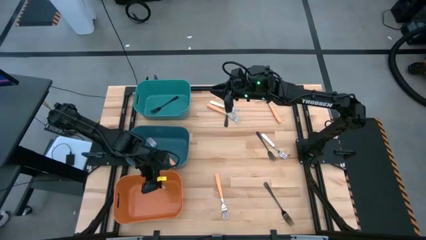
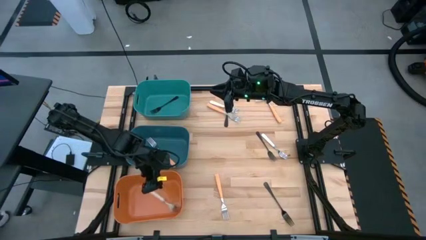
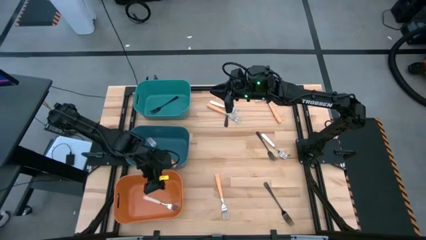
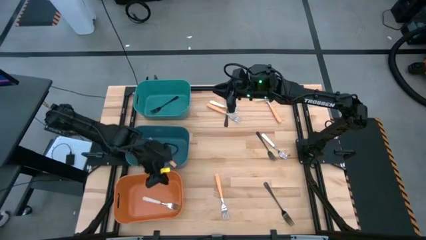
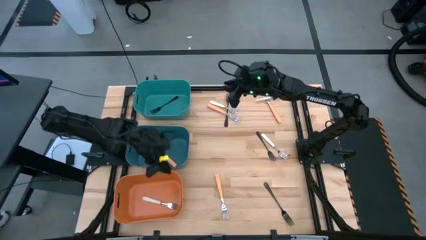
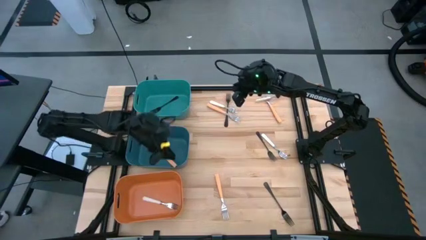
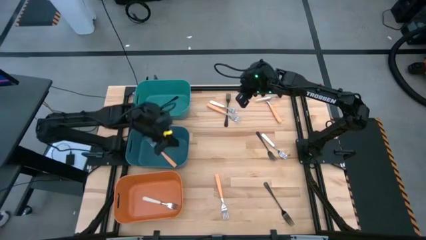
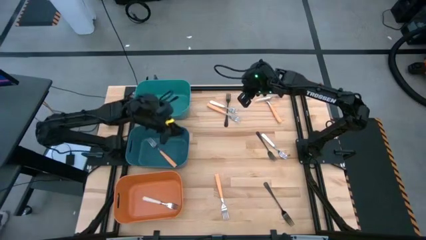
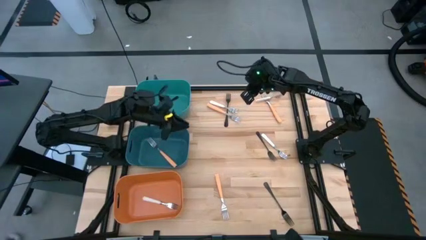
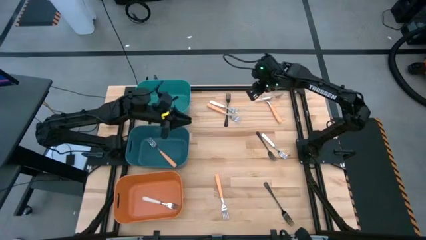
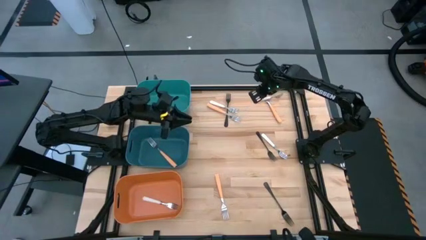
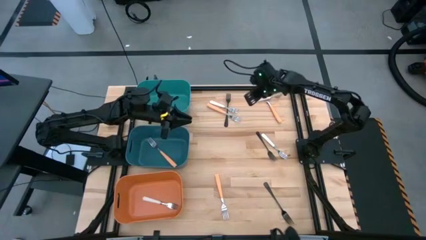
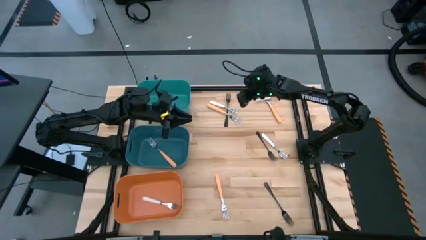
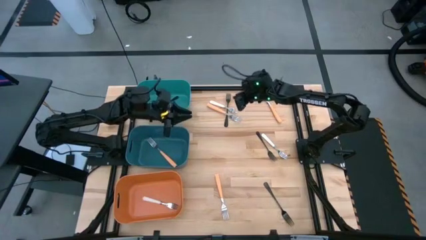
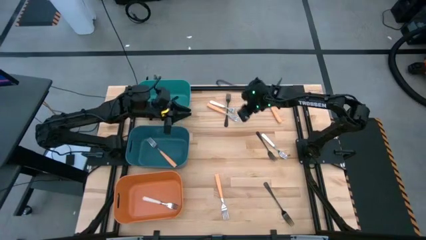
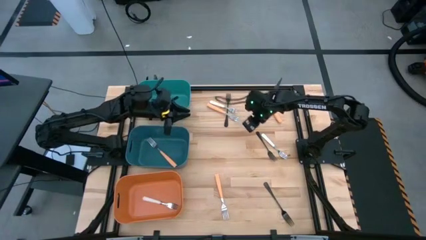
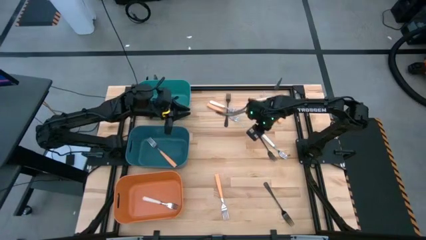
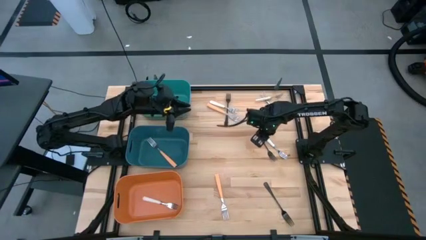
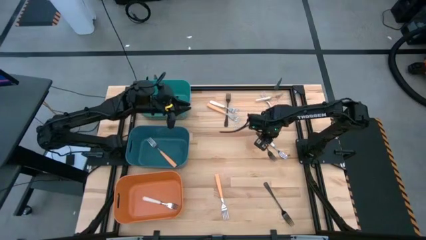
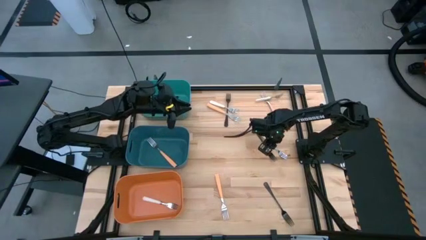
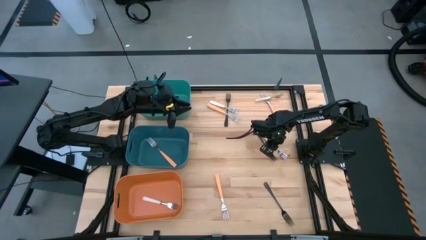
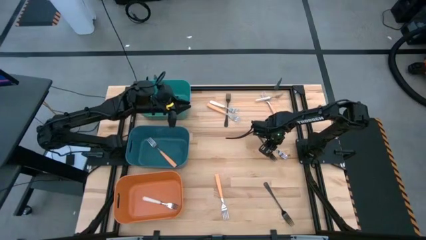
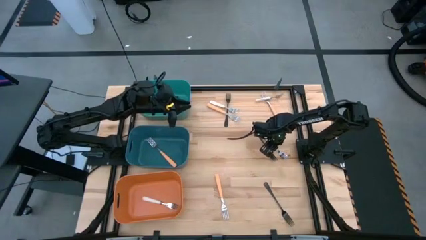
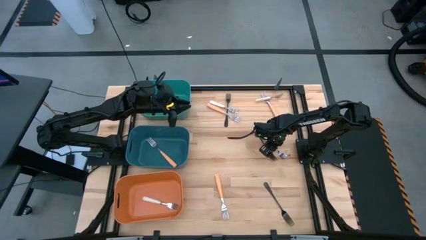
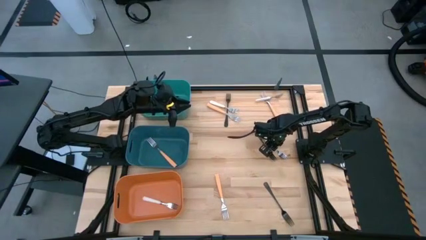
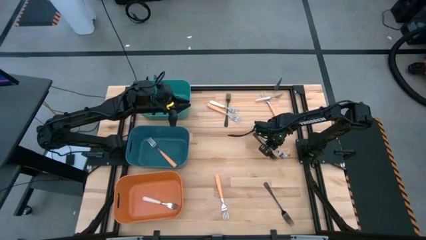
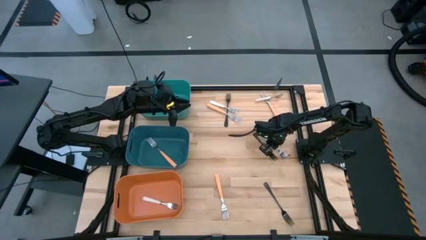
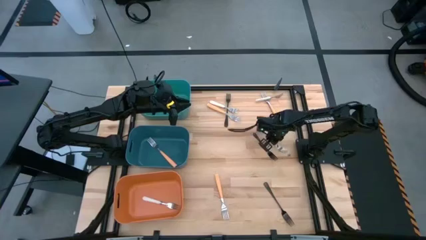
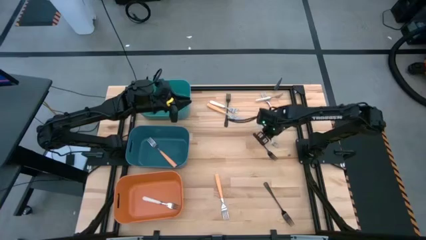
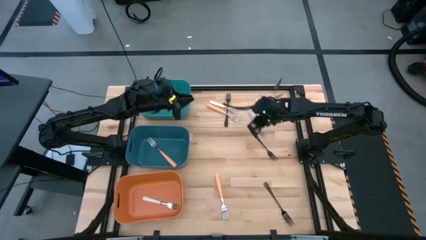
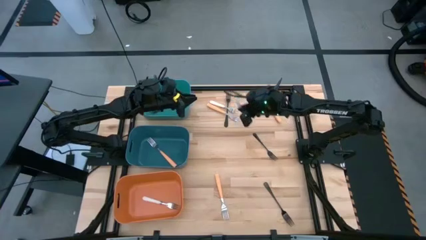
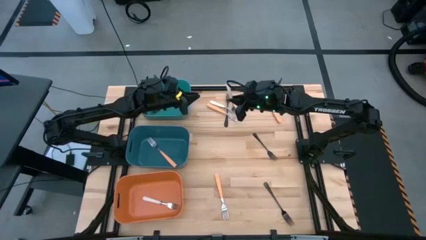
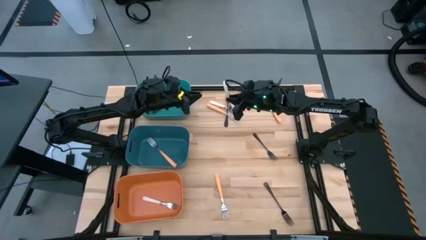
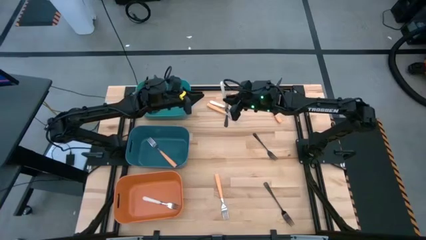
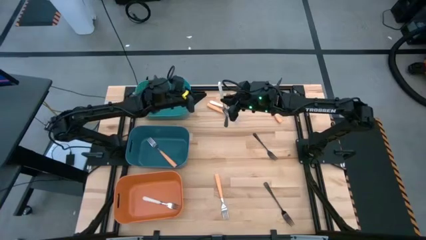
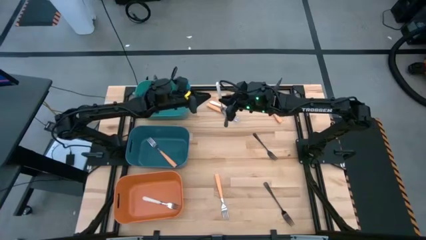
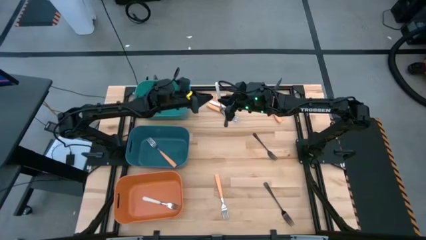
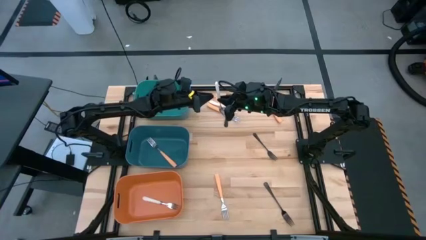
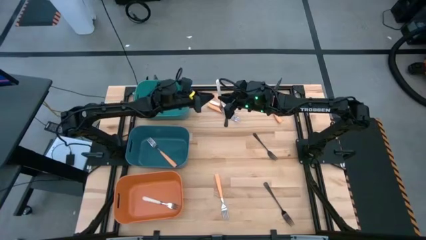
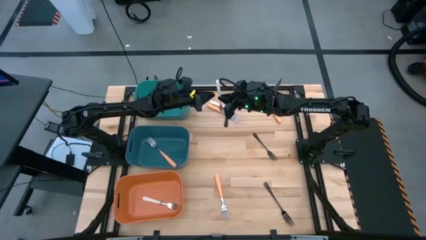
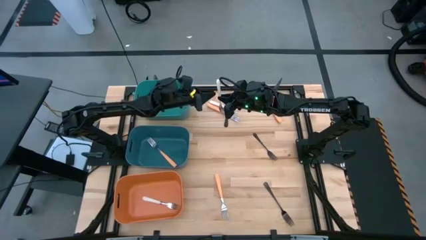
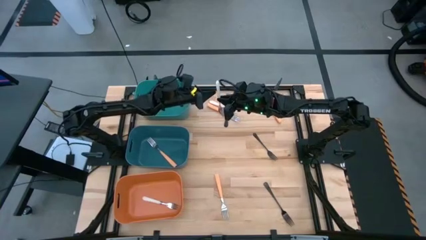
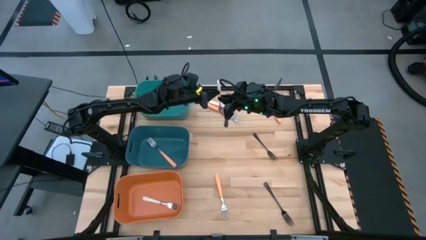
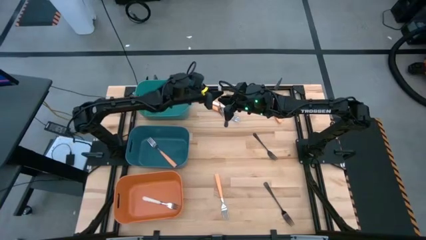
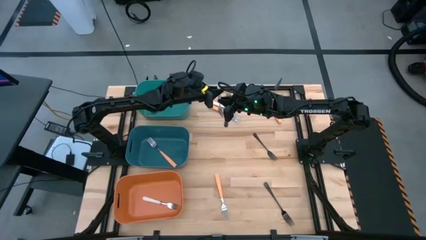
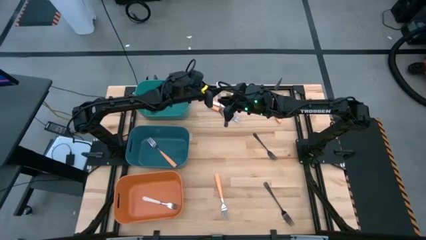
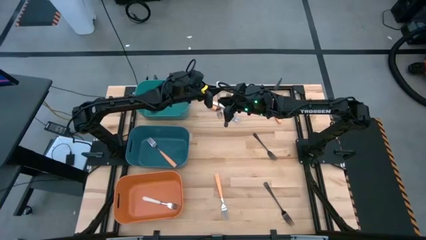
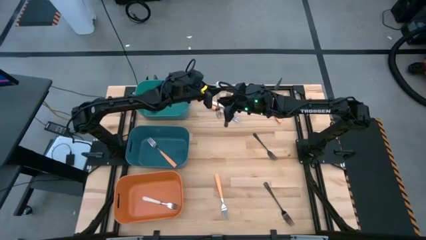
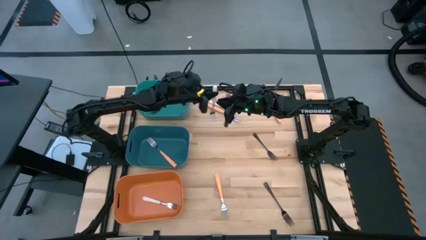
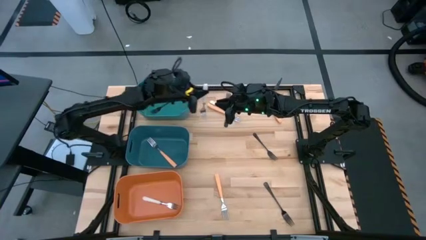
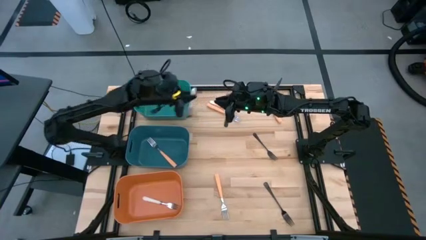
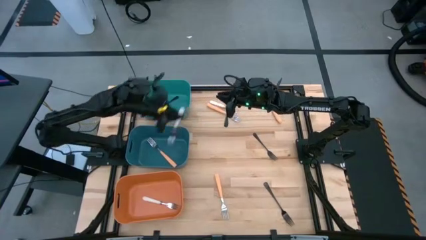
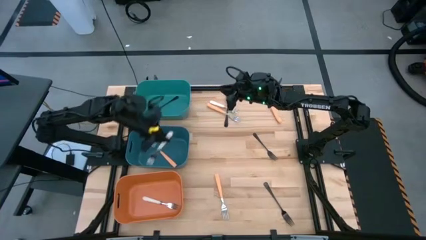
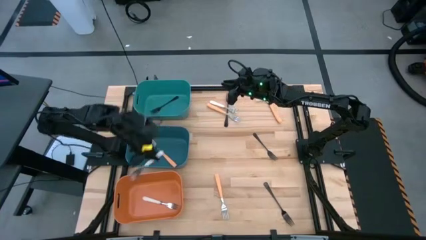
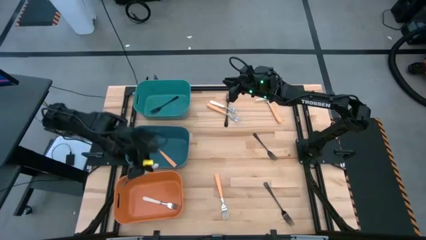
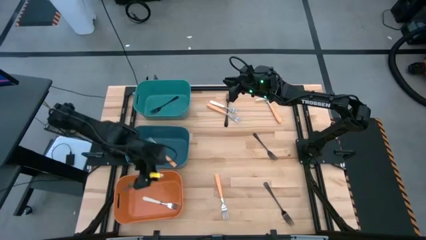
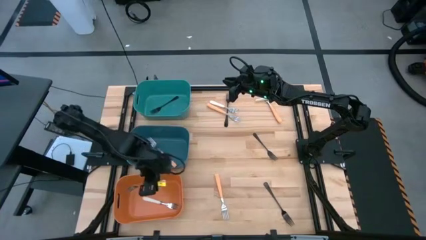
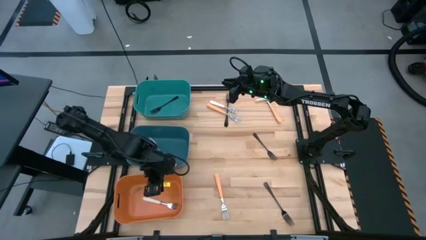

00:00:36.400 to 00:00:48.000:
Task: Sort silverware by color (type)
Put the white fork into the orange bin

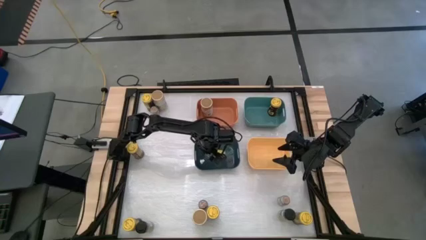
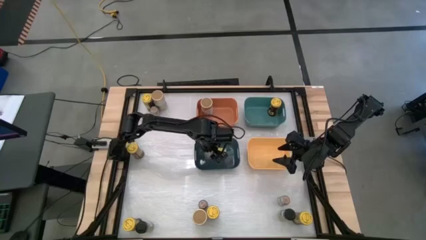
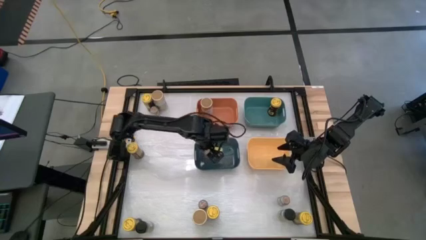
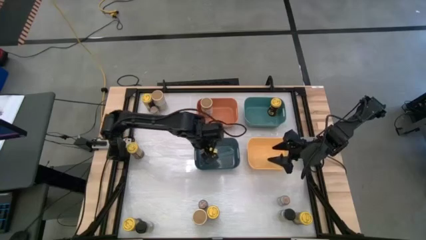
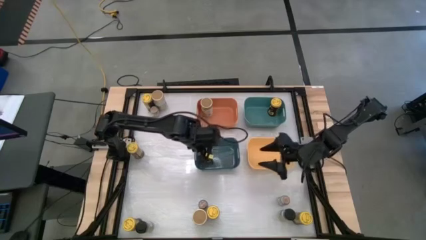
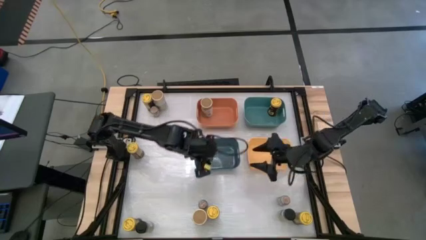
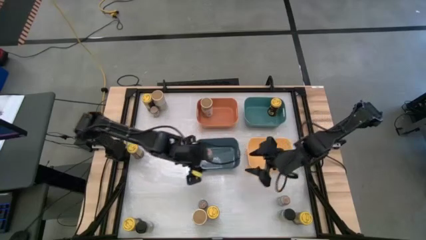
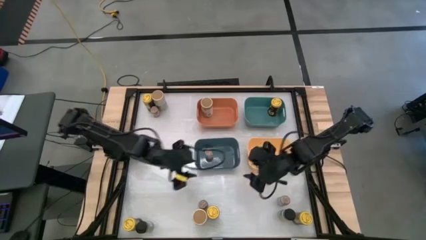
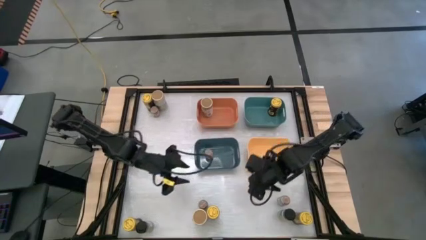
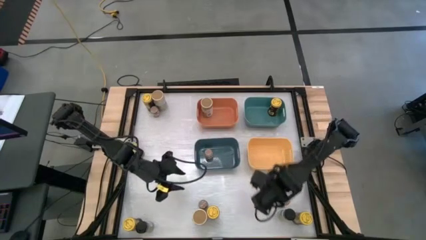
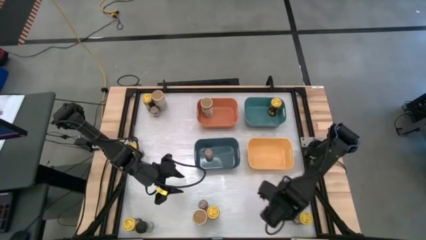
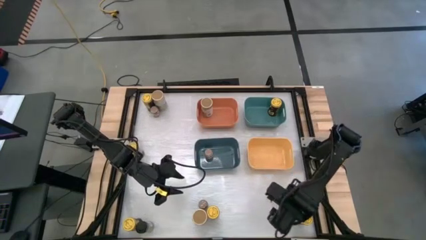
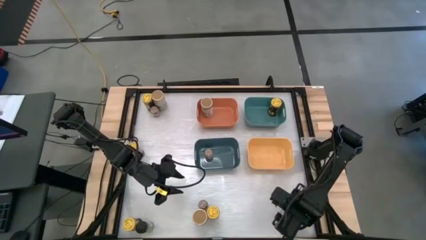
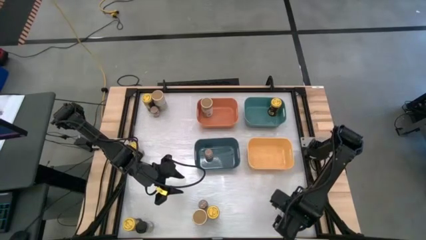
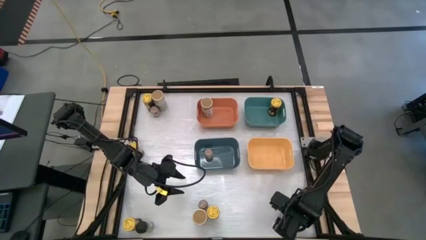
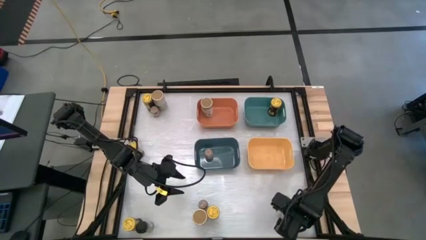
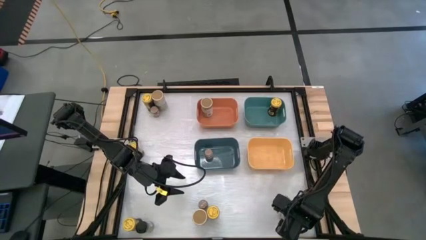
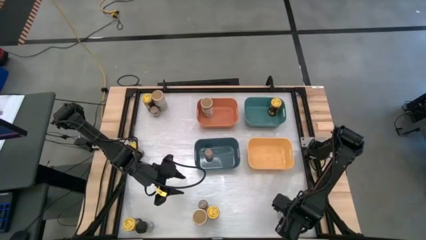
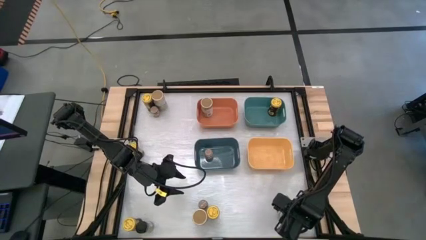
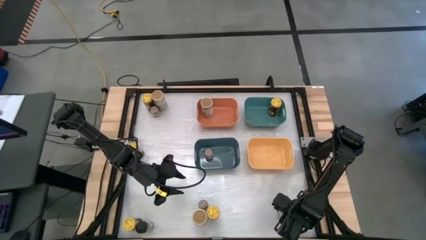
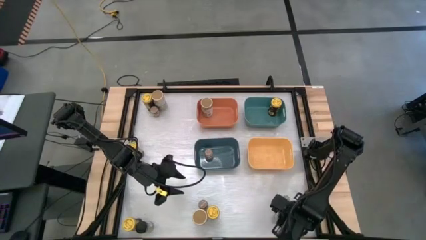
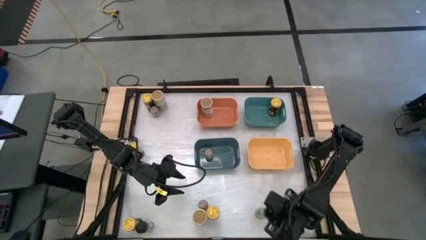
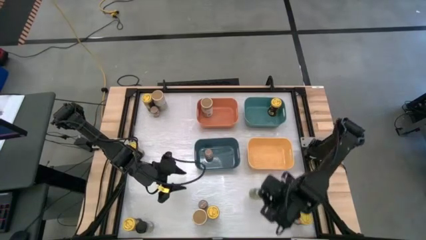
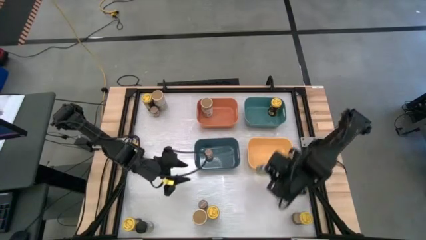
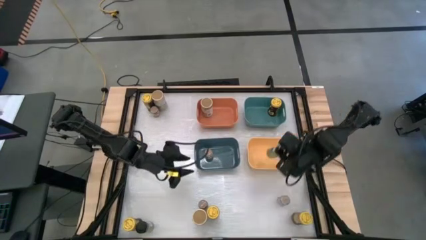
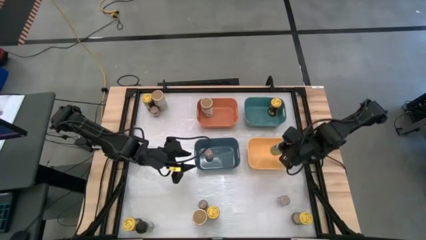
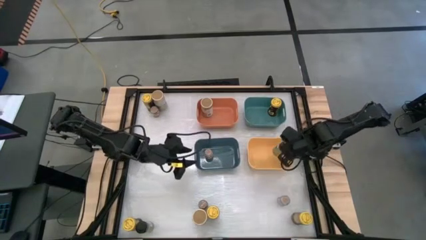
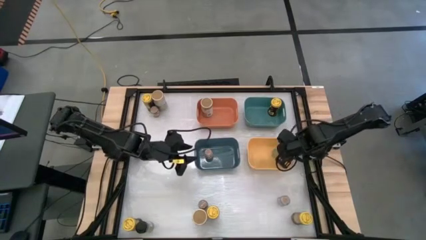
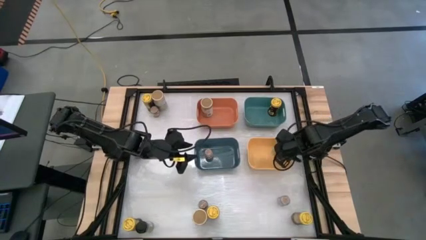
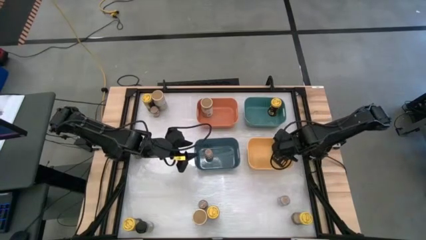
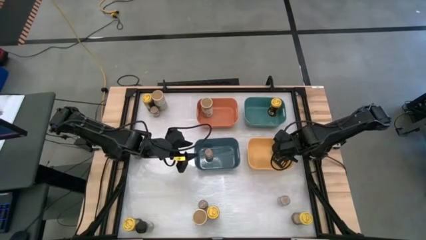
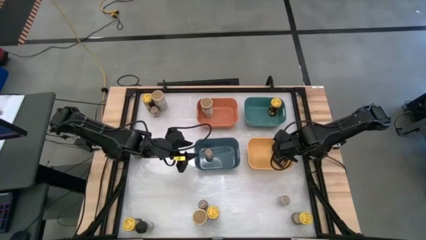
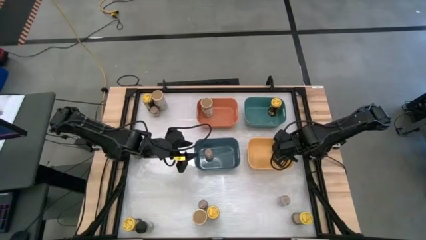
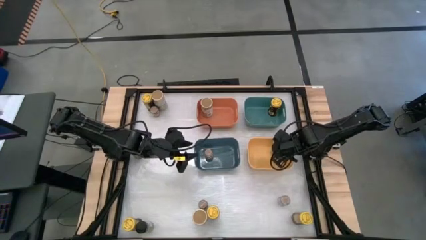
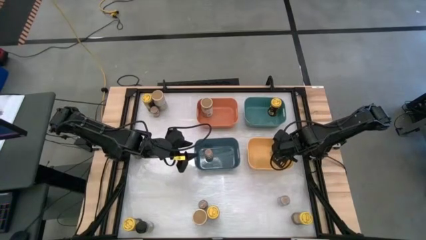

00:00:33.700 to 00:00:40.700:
Task: Sort spices by type
Put the black spice bottle into the yellow bin
